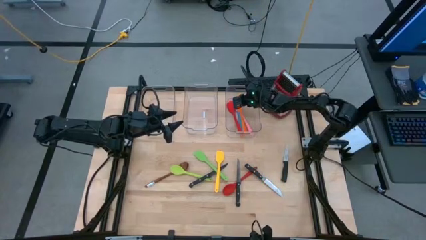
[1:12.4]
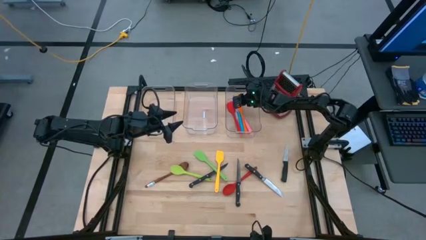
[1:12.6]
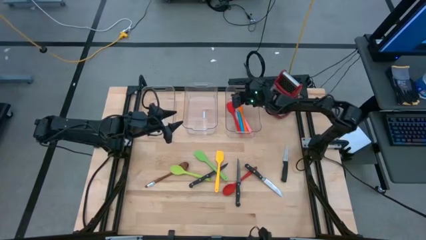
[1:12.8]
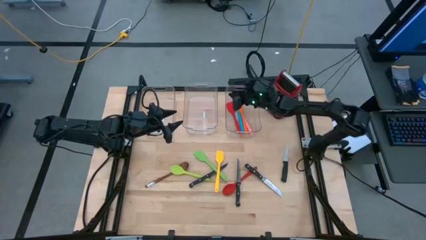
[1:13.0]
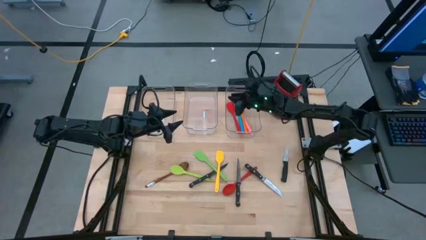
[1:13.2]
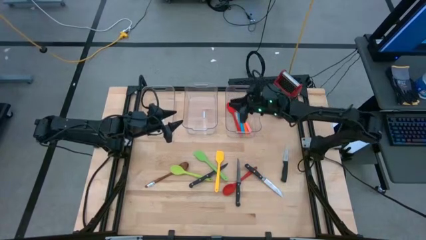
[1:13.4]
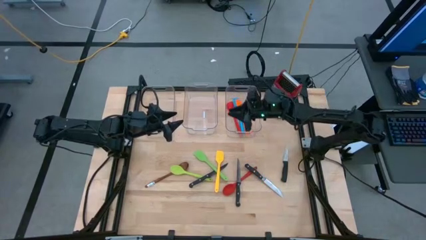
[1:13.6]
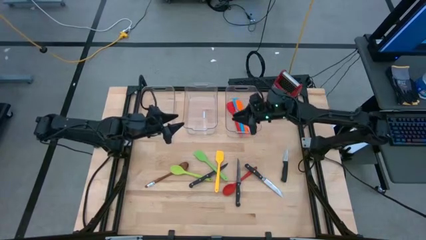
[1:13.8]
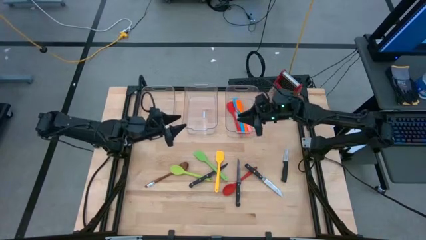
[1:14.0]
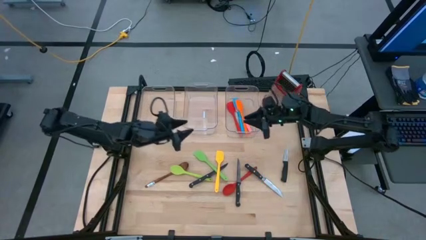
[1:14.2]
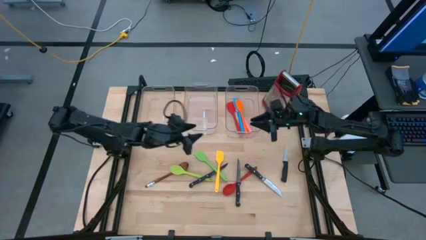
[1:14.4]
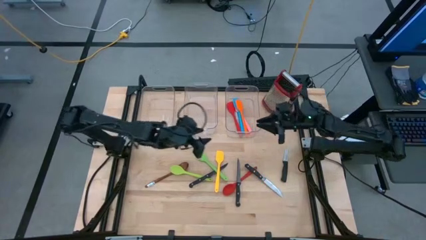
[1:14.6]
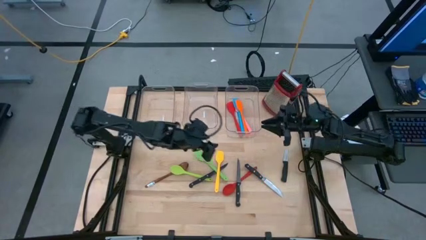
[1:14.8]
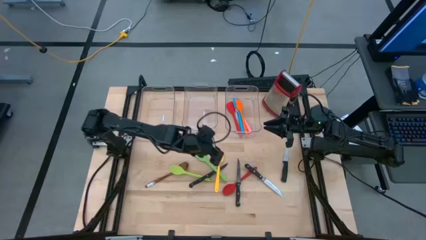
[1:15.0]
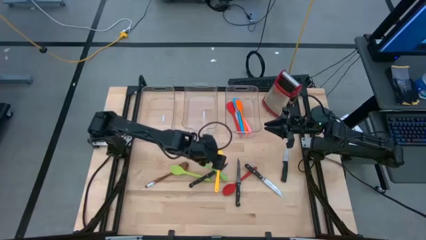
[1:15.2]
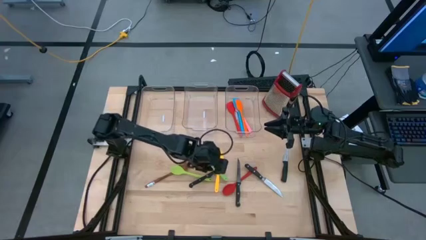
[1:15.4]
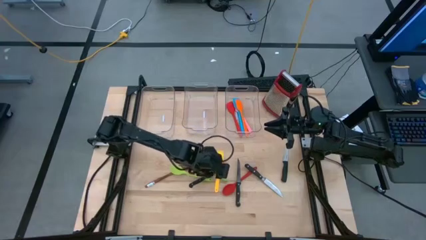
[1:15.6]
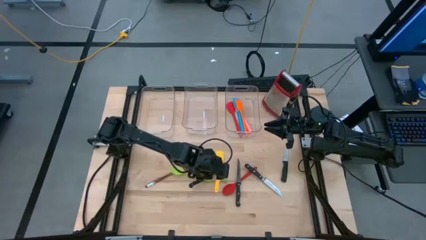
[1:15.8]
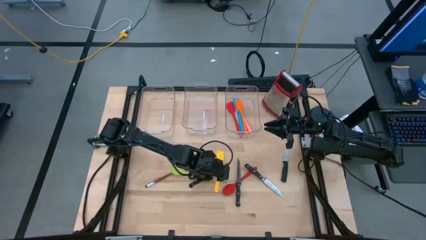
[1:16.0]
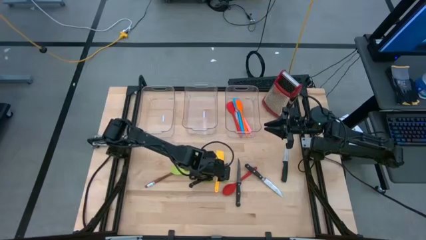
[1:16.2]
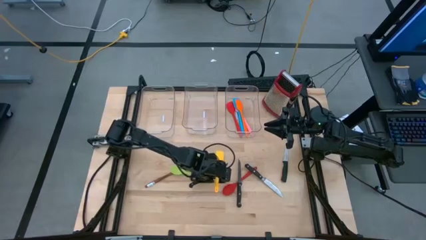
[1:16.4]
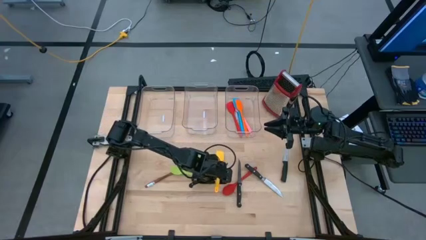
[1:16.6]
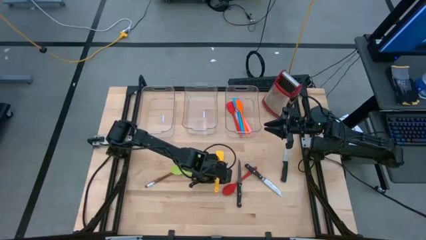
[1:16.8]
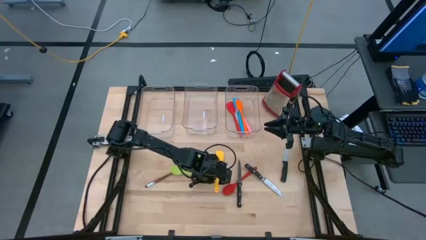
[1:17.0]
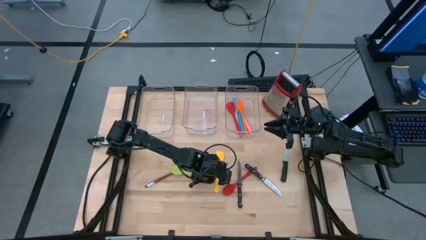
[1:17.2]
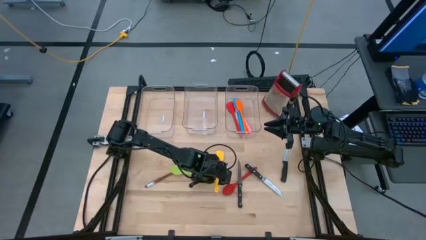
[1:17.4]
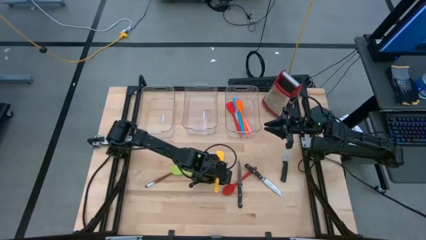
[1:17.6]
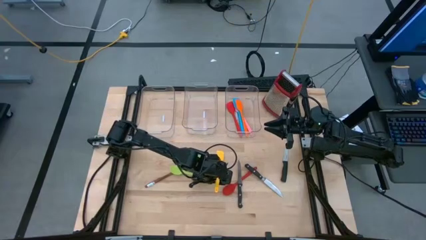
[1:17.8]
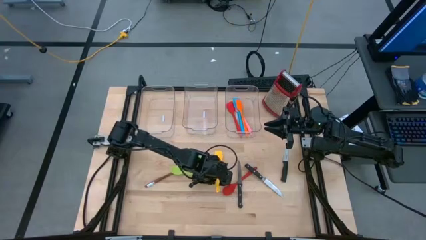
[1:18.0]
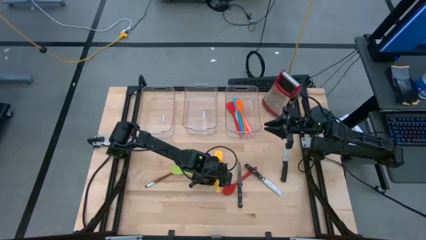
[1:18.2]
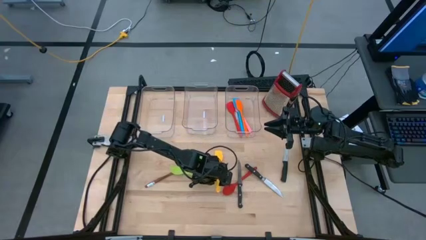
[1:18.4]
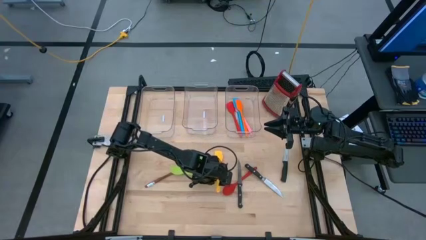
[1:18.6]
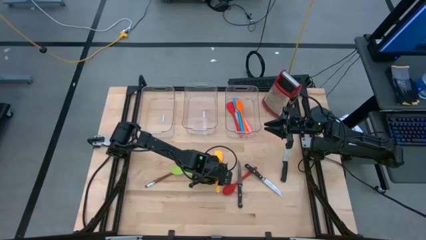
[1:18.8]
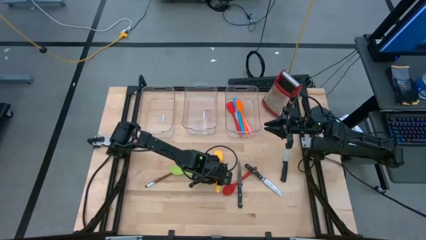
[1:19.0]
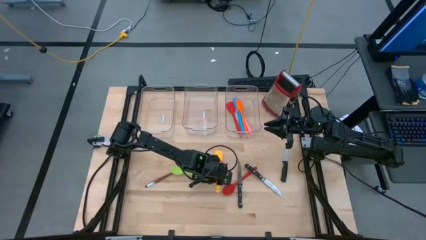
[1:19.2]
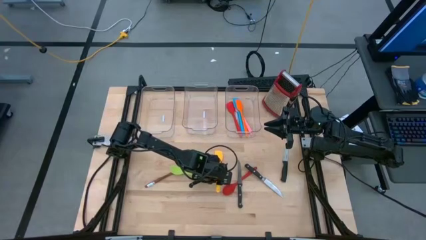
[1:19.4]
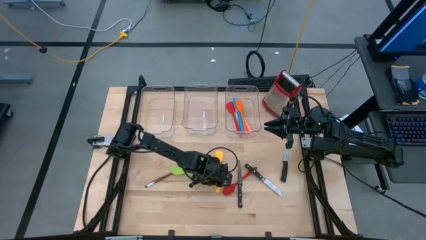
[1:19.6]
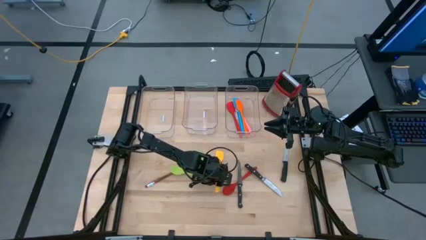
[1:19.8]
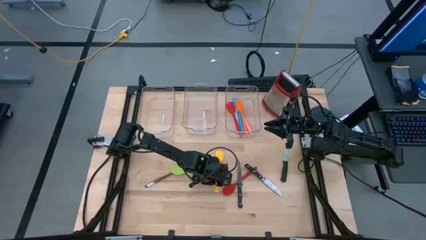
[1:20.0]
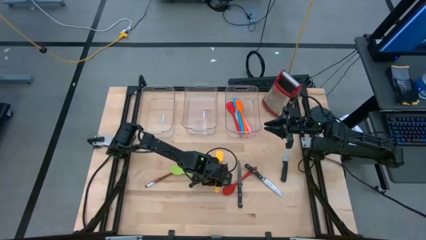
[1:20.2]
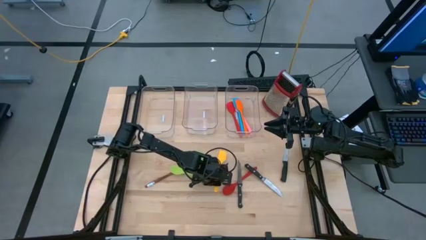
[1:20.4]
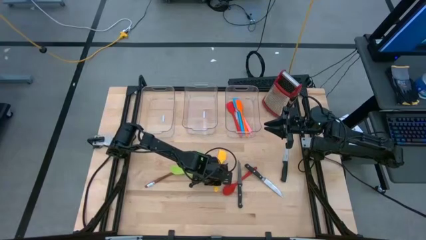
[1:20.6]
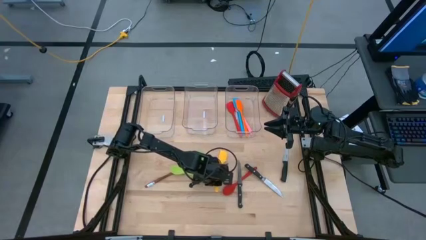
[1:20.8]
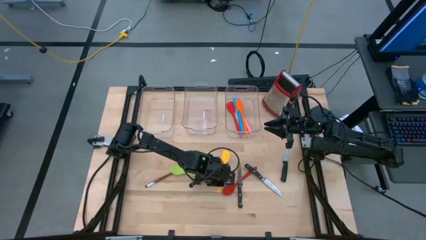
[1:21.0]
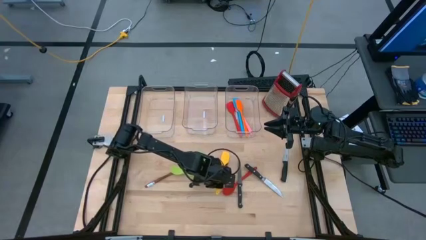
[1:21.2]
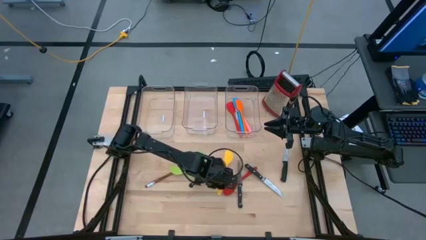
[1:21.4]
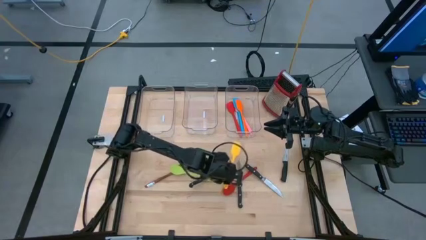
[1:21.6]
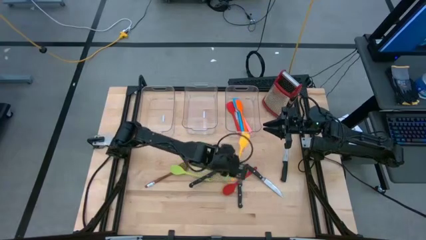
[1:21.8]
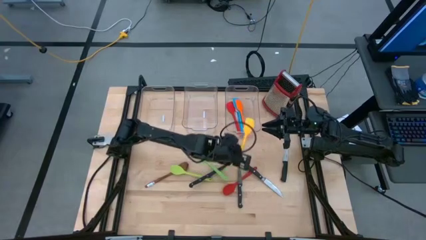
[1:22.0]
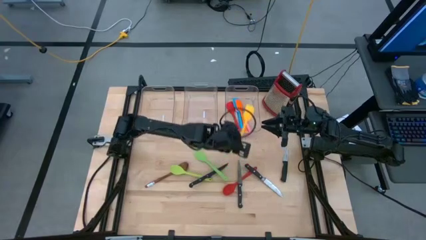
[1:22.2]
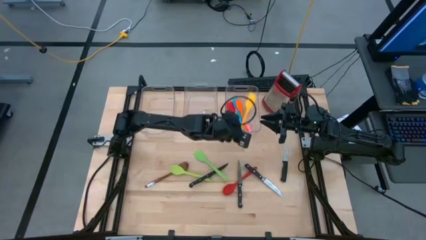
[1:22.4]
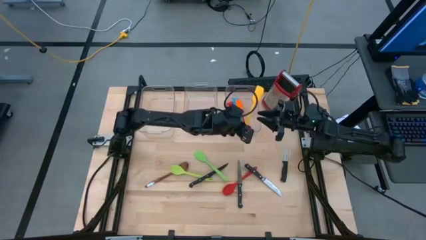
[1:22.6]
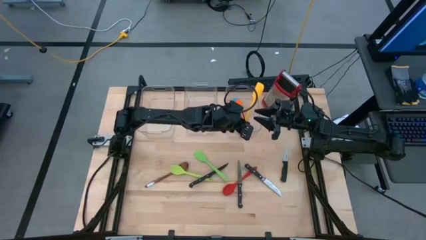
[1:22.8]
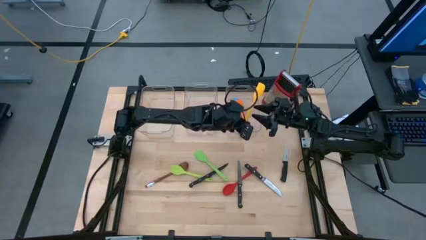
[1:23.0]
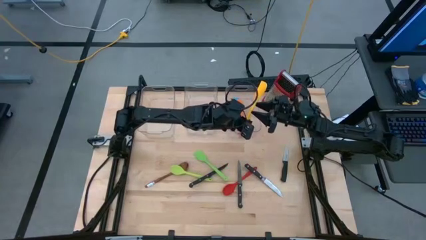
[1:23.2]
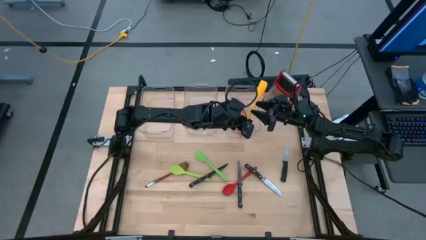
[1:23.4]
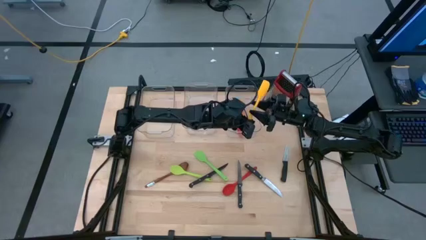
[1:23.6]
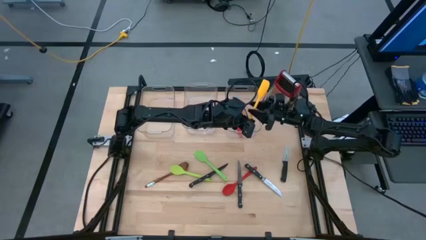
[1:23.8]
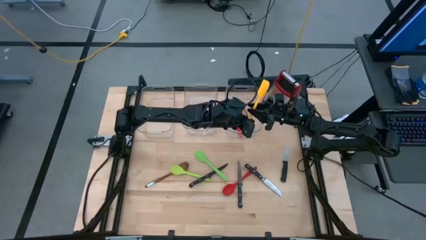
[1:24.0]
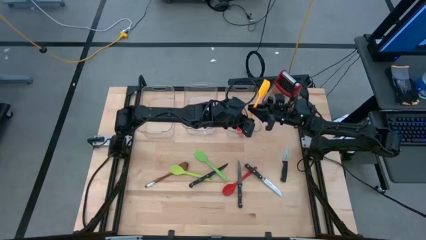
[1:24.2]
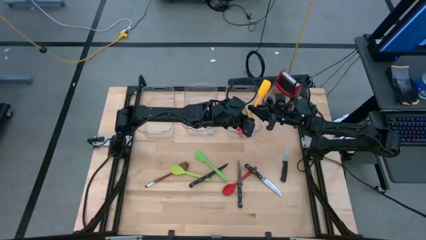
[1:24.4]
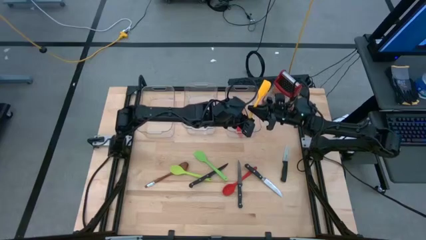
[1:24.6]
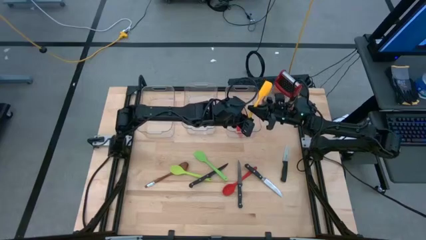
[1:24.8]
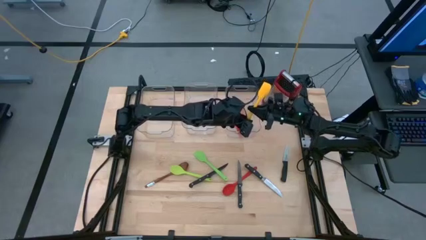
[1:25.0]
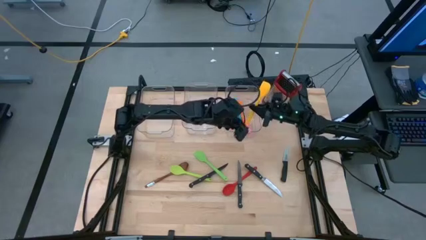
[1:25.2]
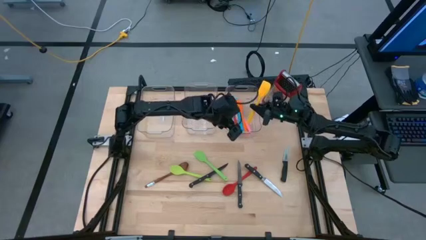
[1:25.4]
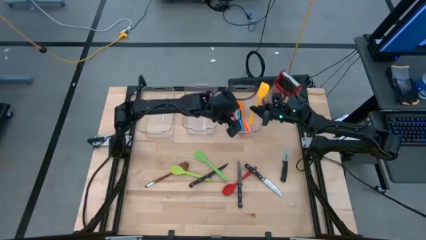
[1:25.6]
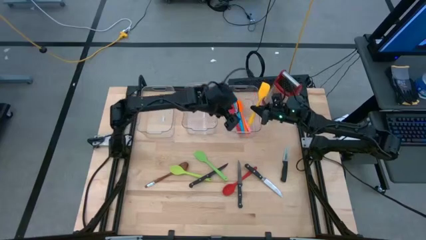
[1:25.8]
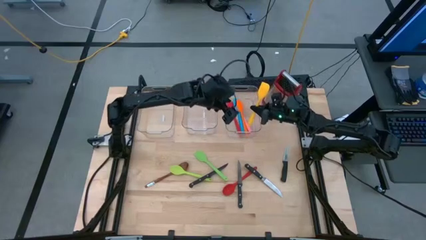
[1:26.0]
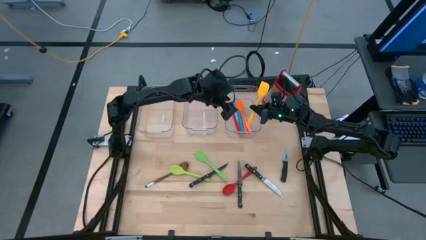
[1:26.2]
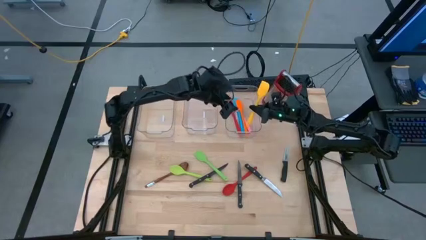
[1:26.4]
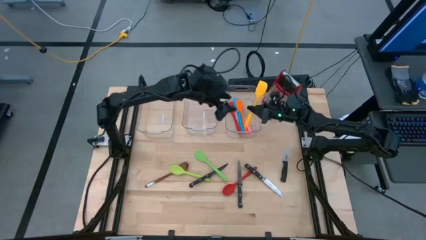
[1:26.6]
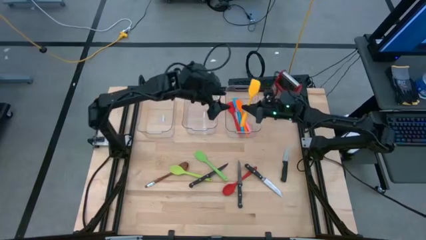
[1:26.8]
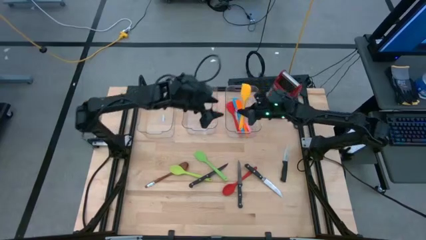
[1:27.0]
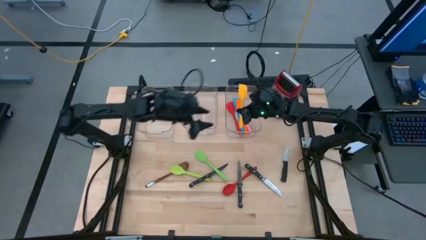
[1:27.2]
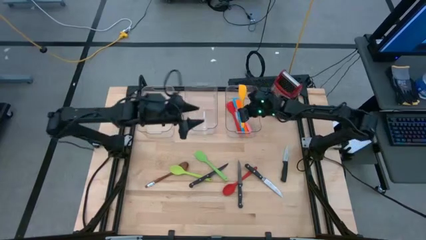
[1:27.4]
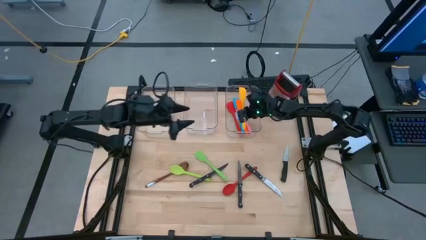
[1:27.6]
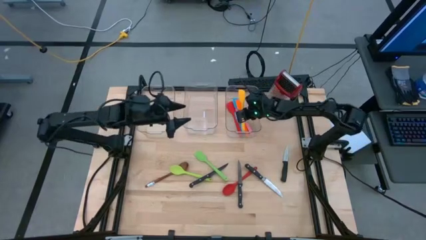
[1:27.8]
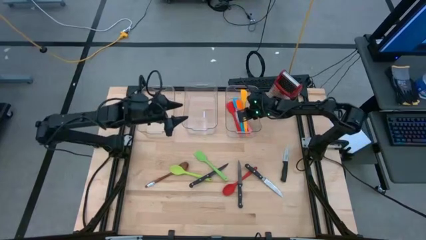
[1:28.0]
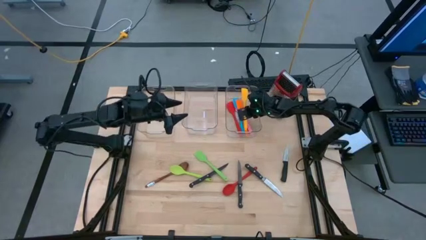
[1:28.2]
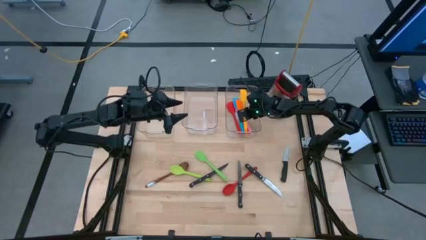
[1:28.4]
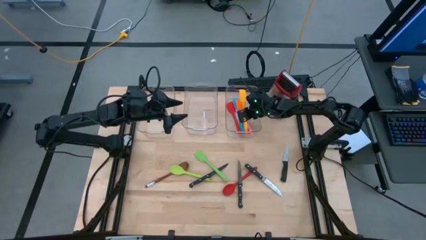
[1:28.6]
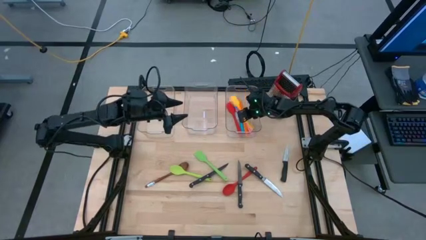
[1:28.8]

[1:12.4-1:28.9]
Task: Pick & Place Kitchen Items
Put the yellow spatula into the right transparent bin
